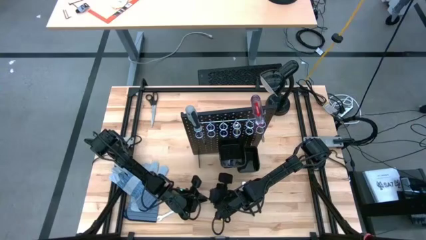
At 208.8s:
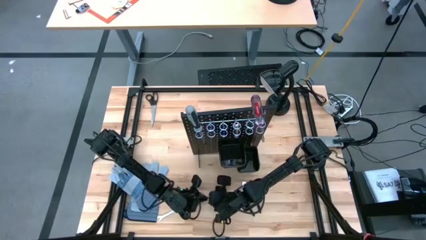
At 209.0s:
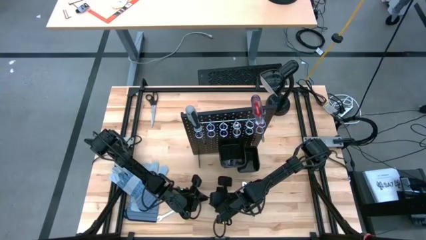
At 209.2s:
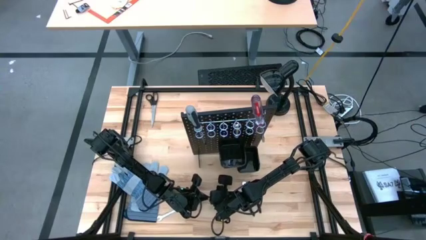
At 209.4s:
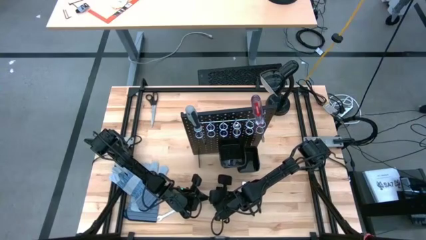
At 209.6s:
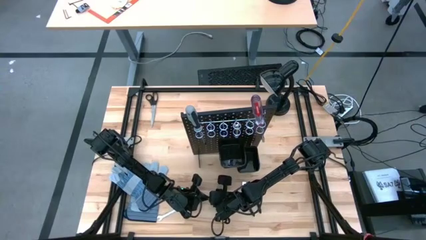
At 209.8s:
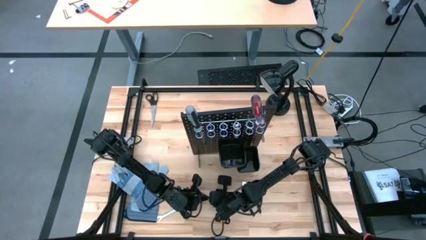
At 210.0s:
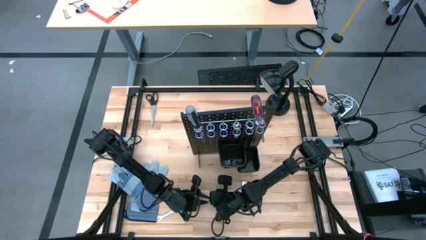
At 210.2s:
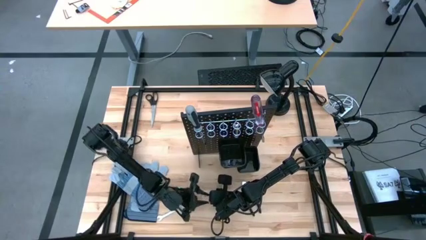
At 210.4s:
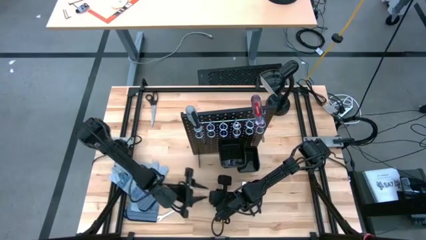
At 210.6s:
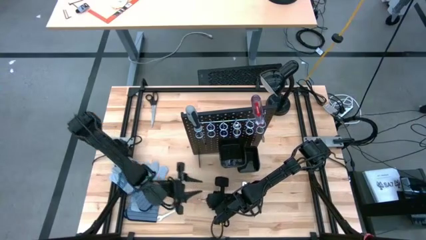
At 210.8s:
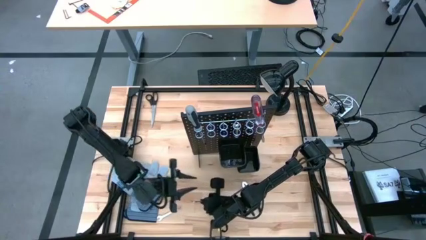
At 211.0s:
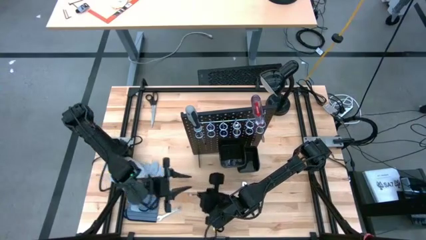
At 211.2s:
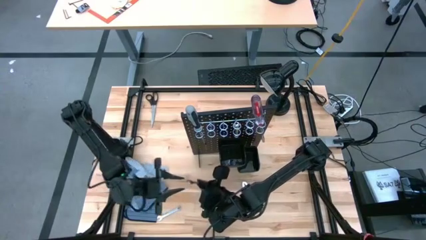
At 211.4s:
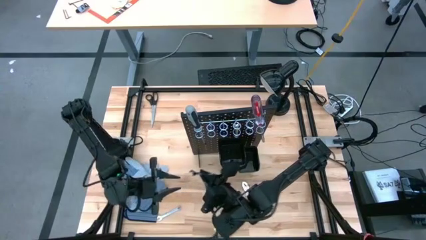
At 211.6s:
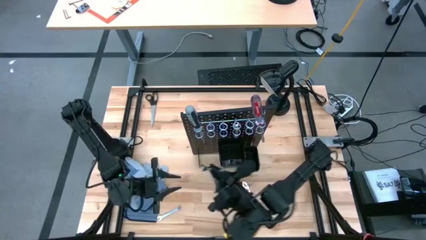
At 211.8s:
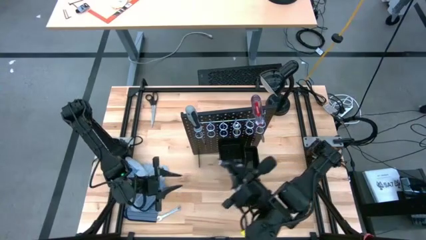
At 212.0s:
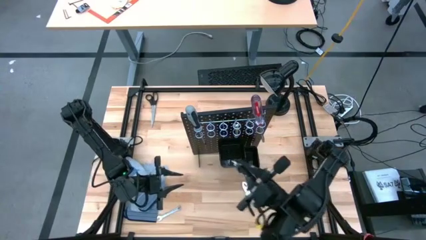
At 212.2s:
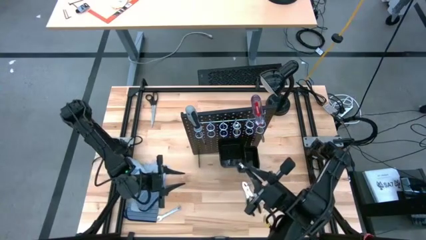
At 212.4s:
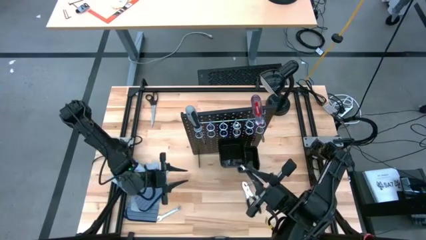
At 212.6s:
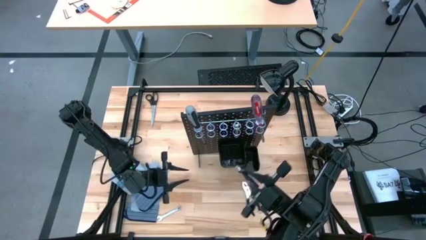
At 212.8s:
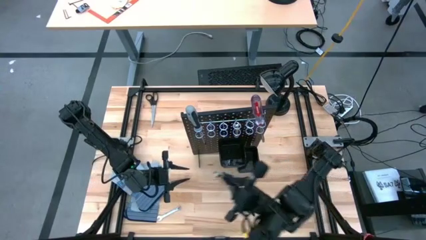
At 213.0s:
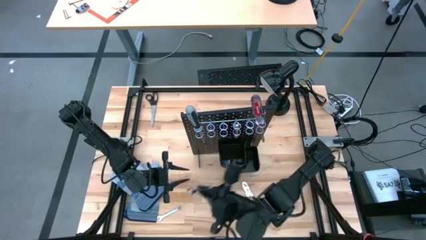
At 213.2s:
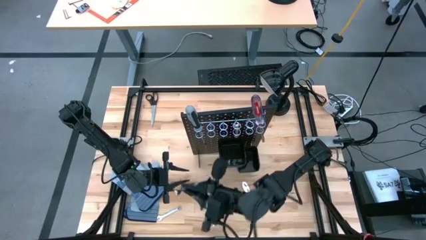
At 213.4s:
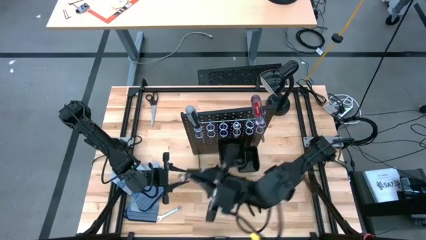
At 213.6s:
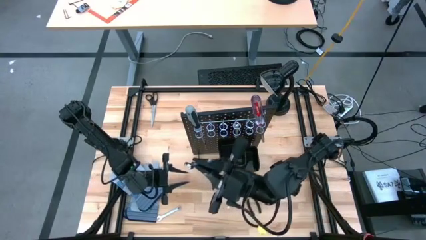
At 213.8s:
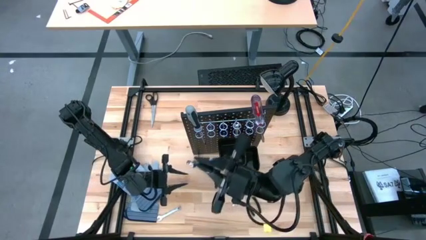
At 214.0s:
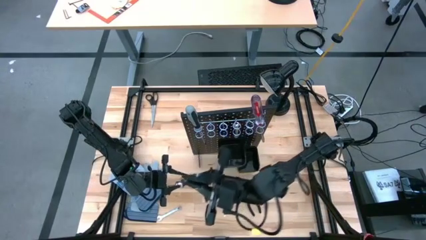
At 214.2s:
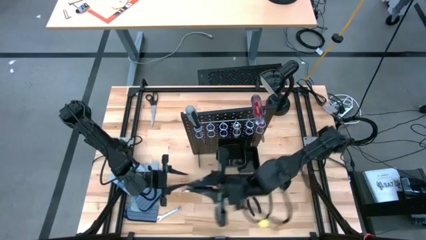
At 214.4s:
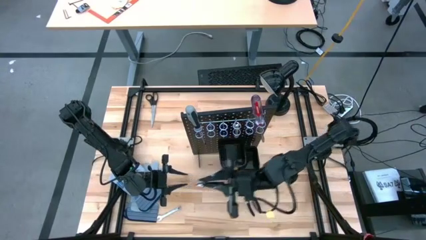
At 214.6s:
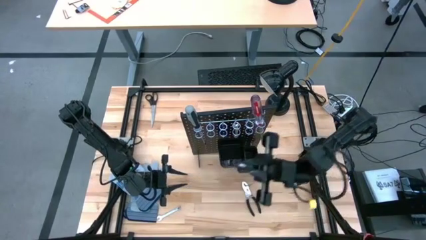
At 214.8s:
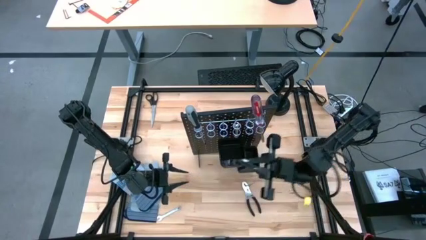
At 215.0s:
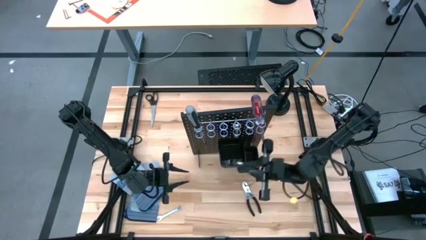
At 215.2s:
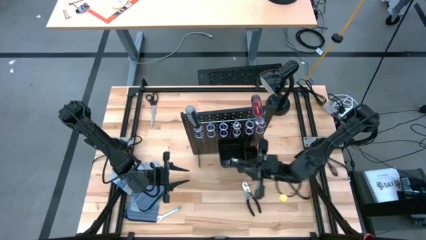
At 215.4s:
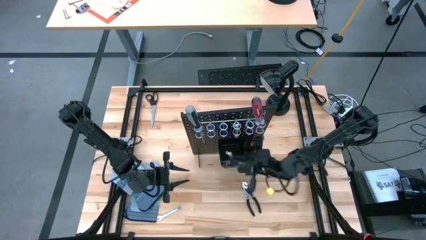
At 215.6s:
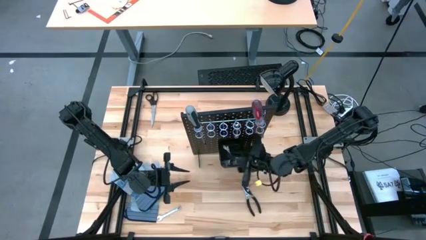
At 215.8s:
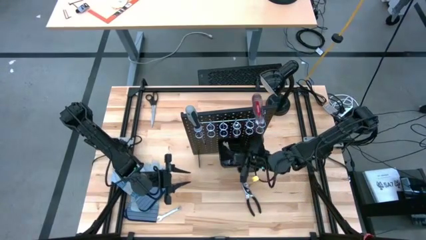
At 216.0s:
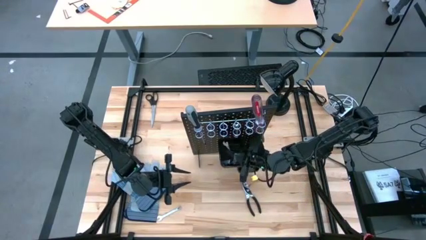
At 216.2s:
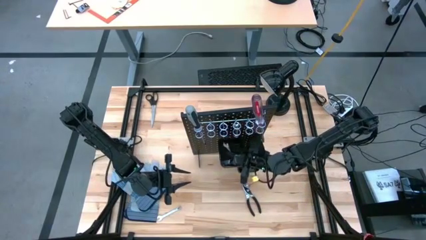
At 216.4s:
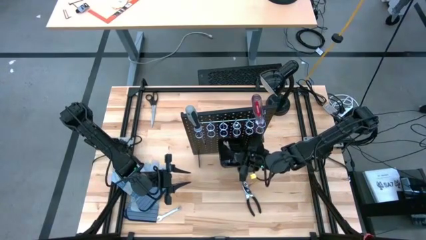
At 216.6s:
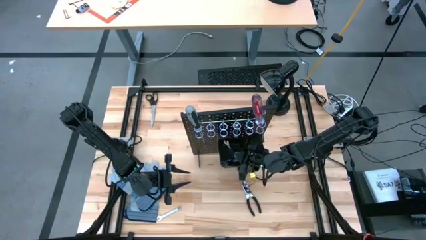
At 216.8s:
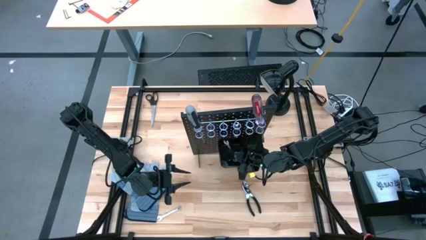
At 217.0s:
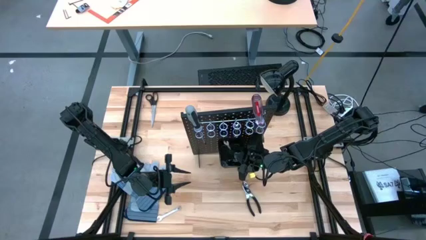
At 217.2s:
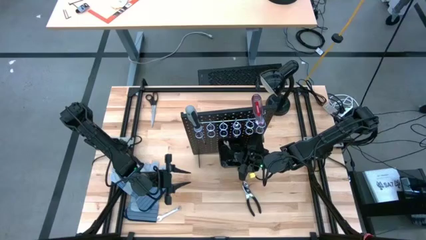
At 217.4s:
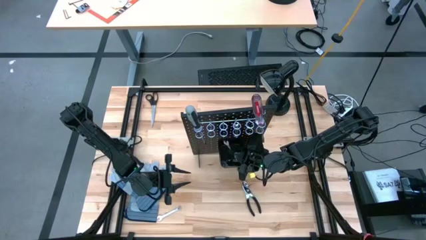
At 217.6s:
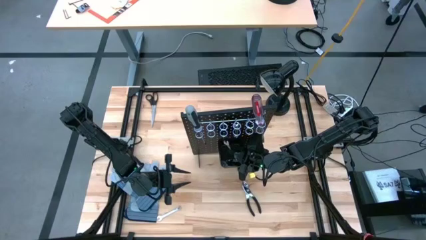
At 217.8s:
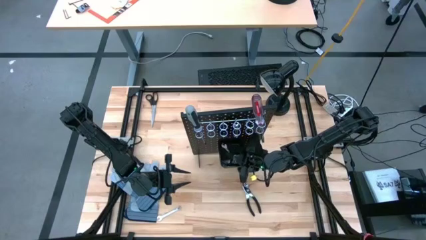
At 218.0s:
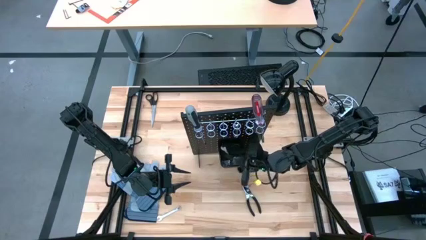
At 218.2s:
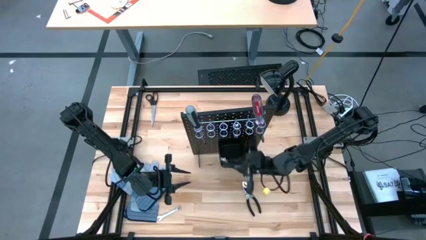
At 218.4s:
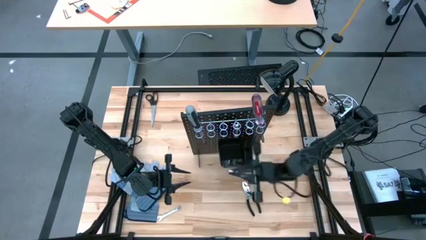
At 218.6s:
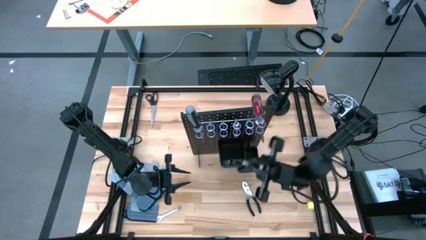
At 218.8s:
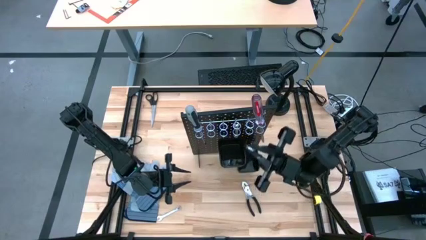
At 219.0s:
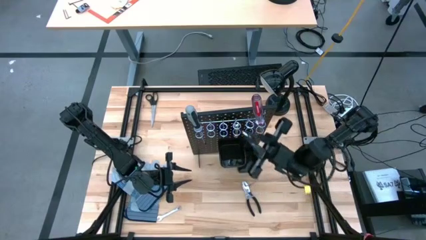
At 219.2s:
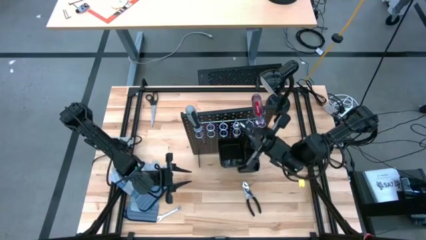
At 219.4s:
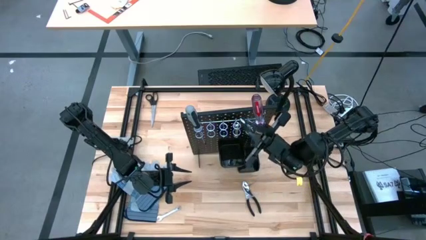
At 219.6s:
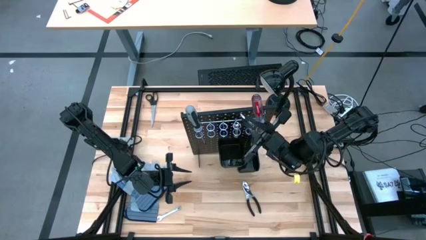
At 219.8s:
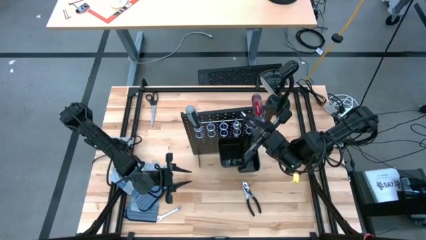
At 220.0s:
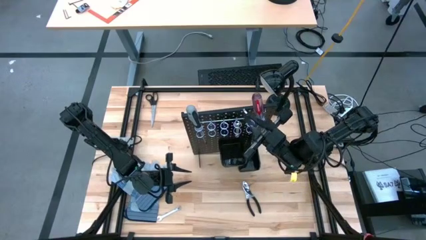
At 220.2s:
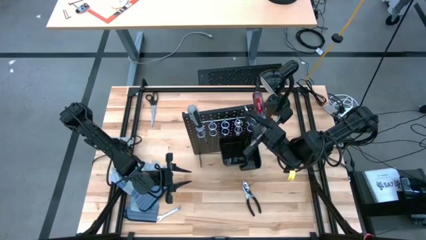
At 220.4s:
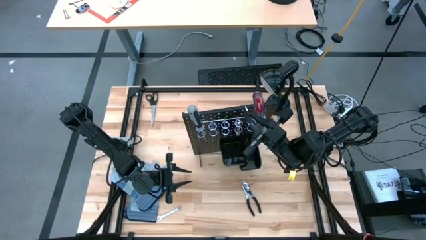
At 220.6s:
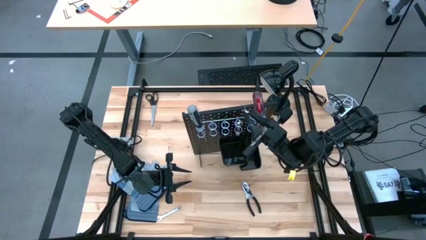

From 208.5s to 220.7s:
Task: Hang tools onto peg board
Hang the silver wrench on the black peg board
